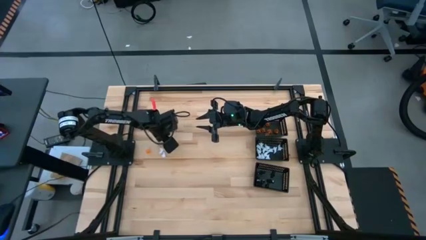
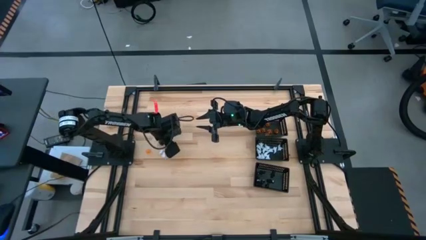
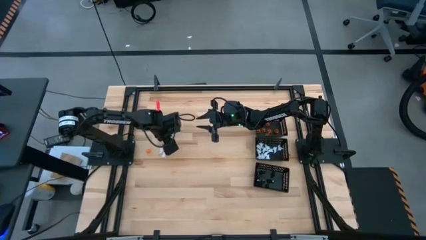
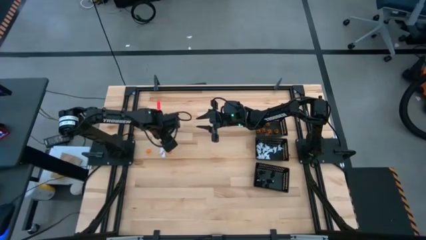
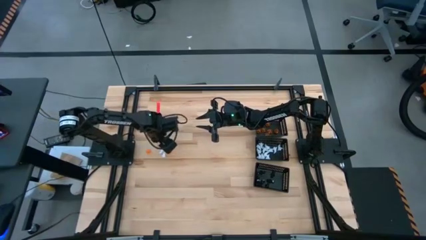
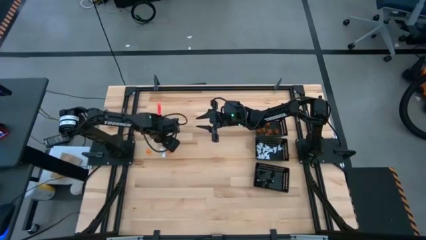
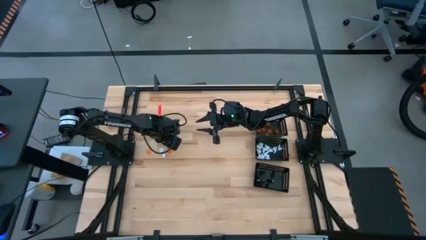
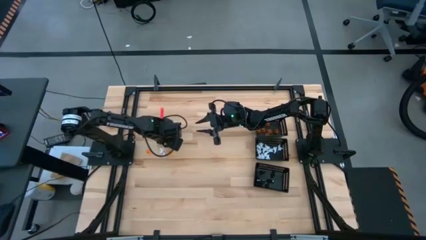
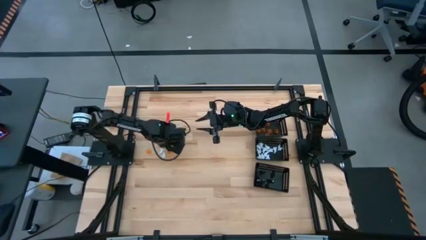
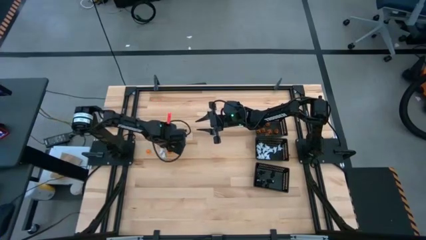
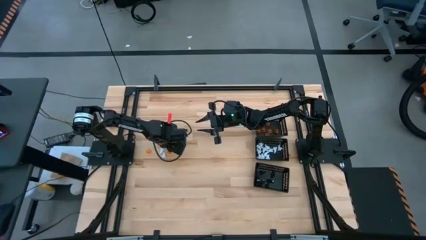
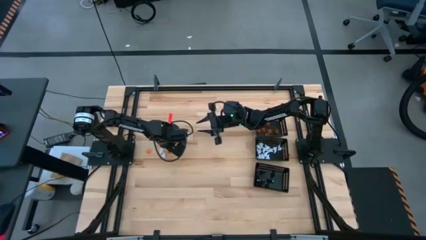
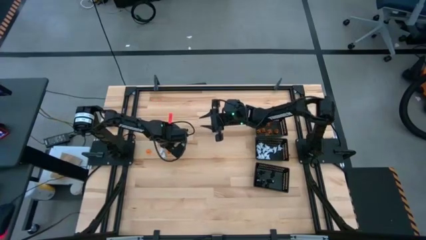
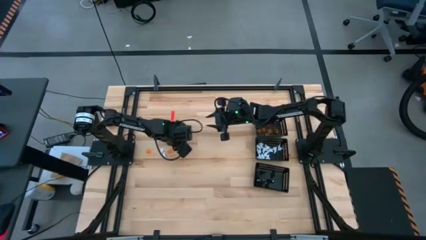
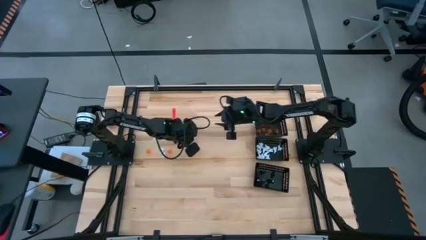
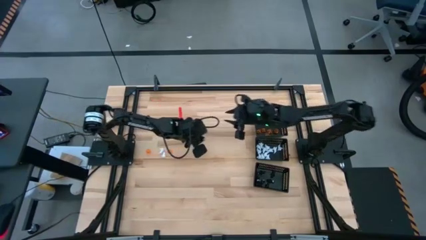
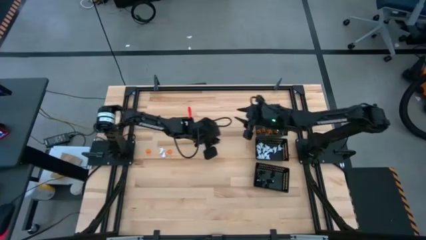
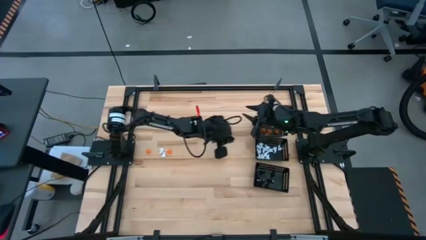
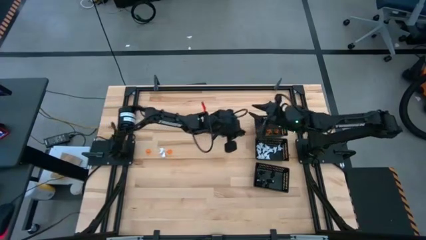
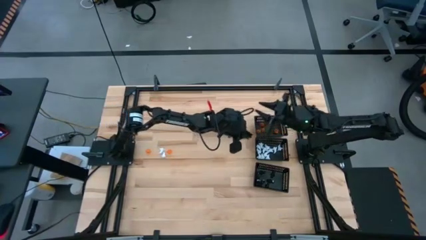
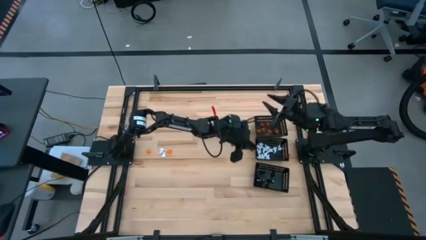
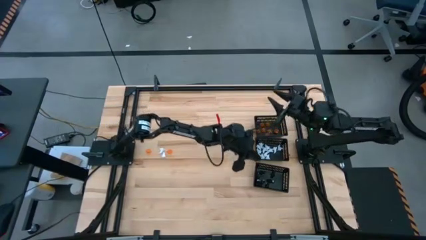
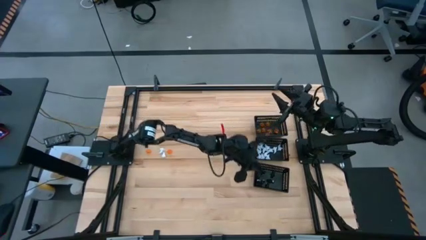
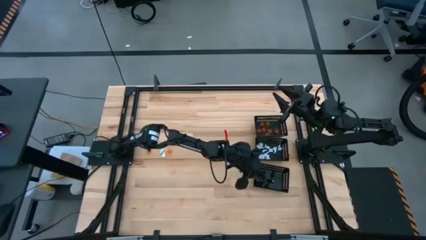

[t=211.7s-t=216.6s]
Task: Sort Halloween decoration
Put the black skeleton toy into the bottom black bin

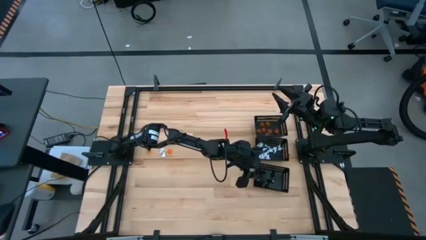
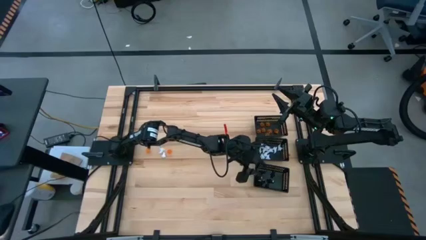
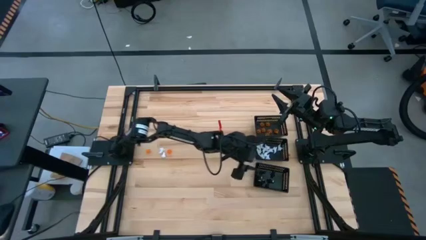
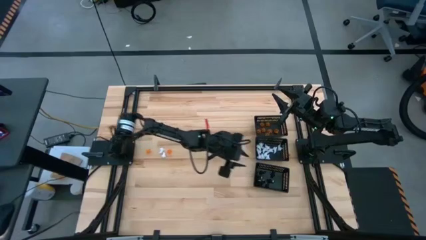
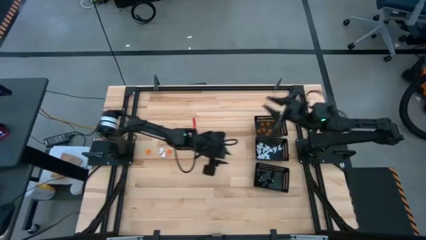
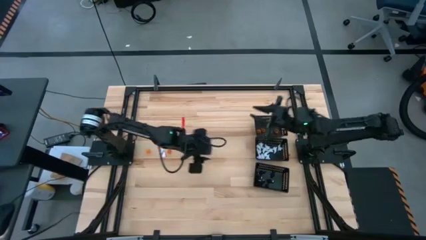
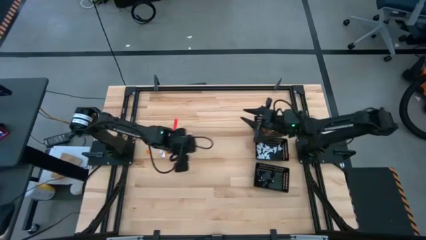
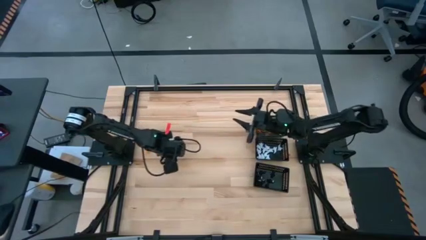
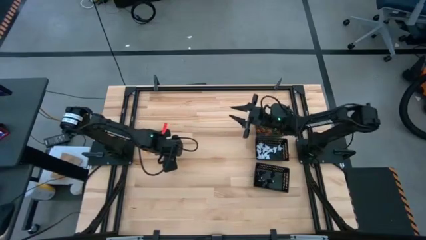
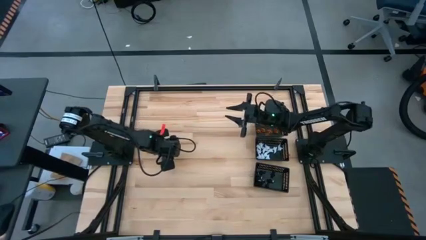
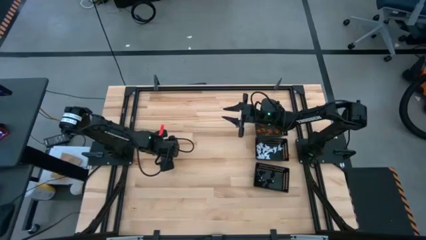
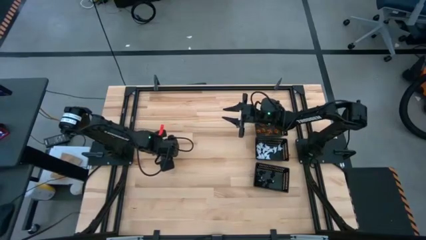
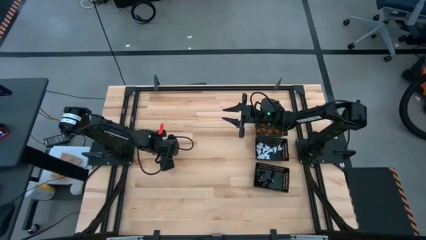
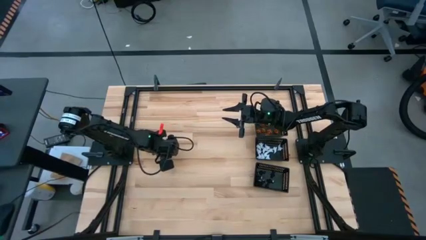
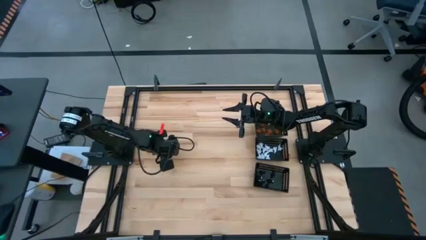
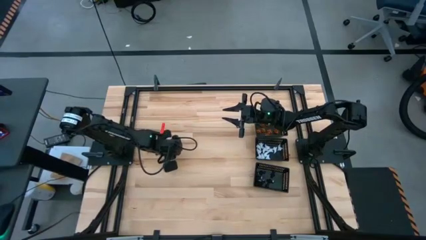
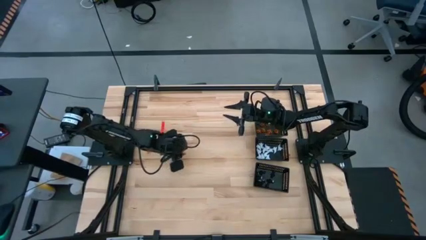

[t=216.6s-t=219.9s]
Put the orange pumpkin toy into the top black bin

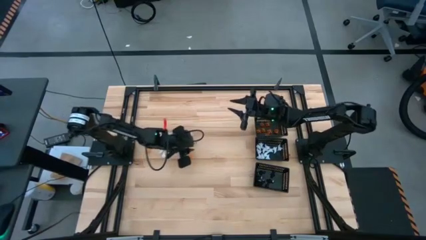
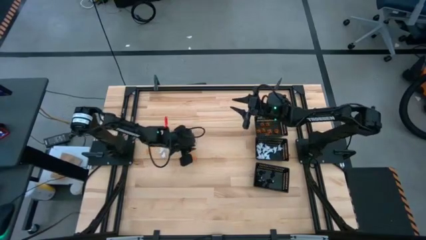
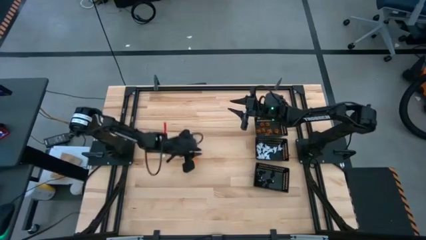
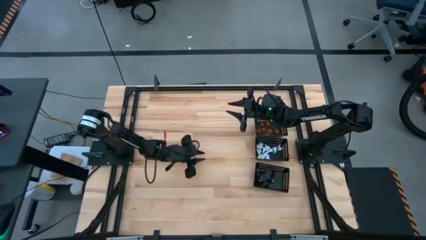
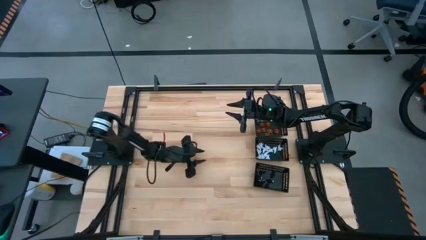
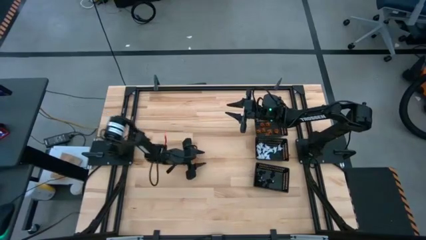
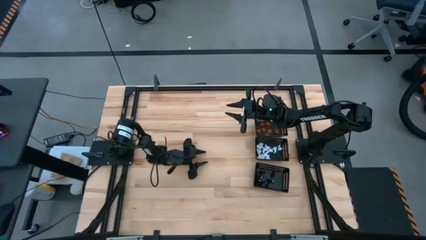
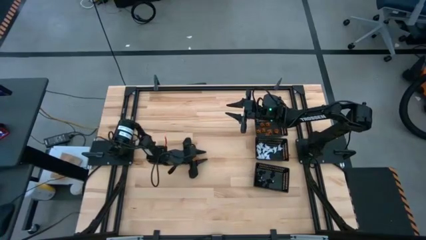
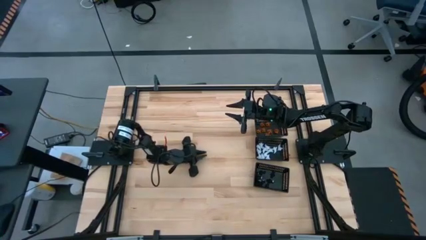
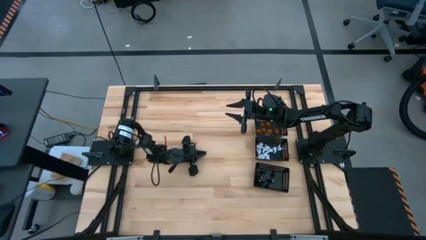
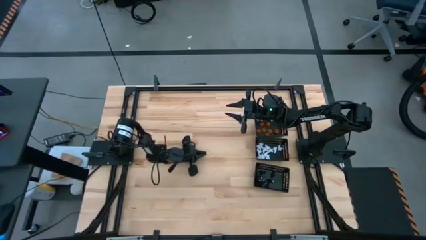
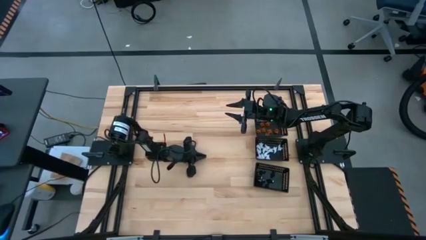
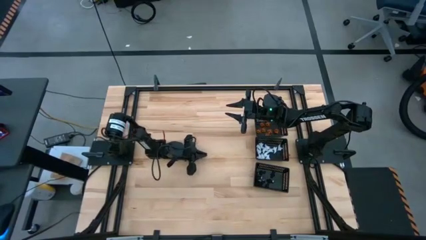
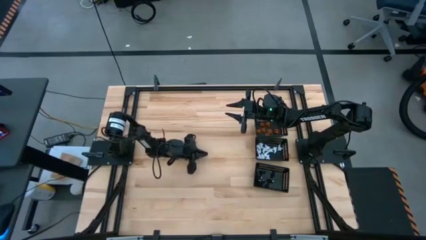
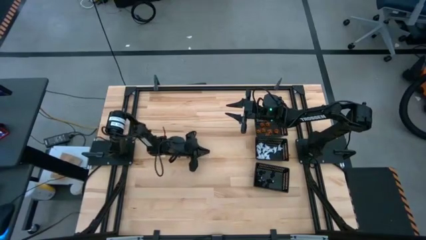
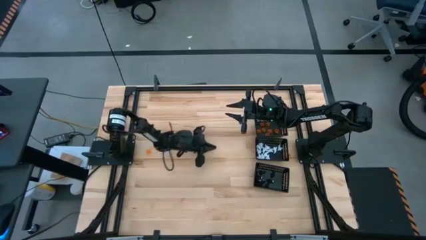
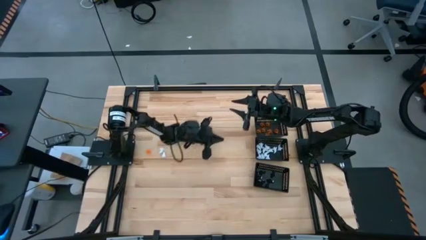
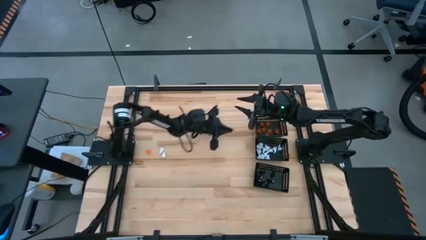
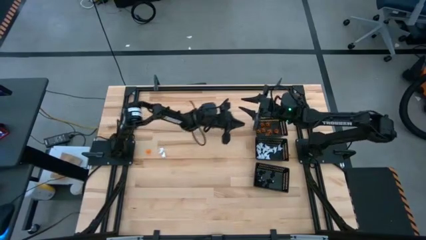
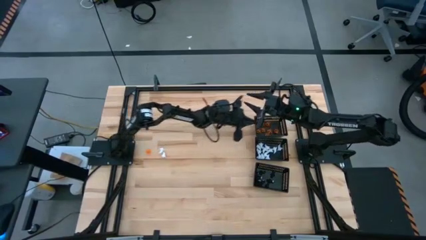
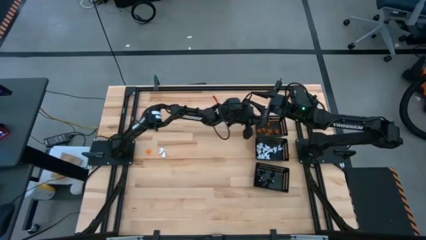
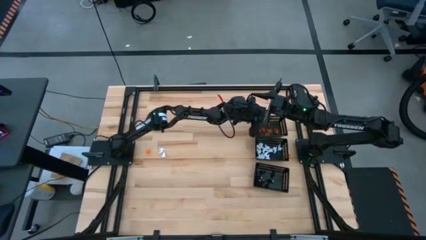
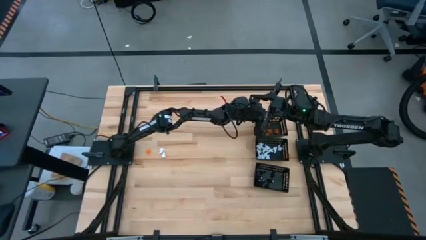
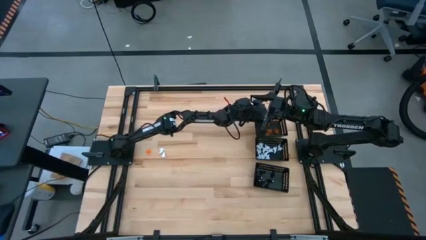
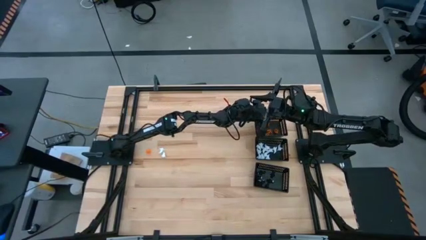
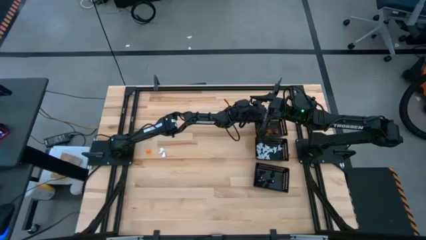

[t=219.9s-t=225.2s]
Put the orange pumpkin toy into the top black bin
